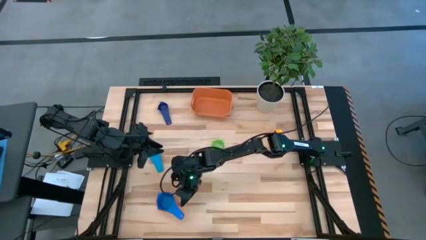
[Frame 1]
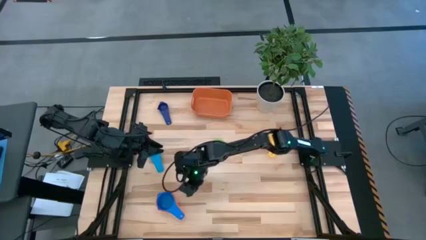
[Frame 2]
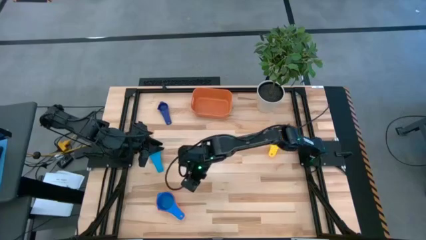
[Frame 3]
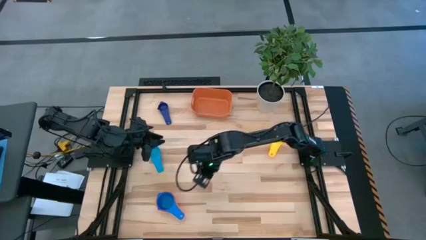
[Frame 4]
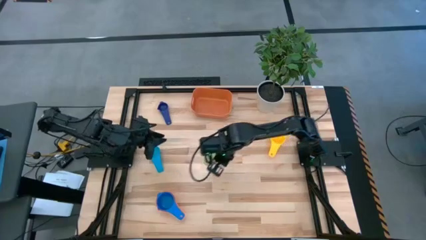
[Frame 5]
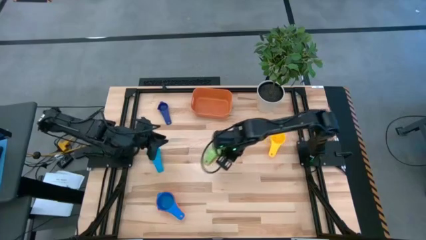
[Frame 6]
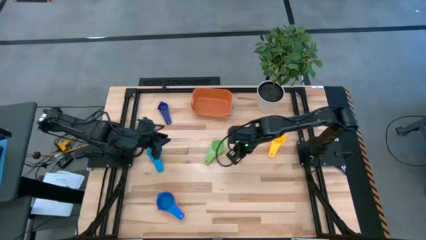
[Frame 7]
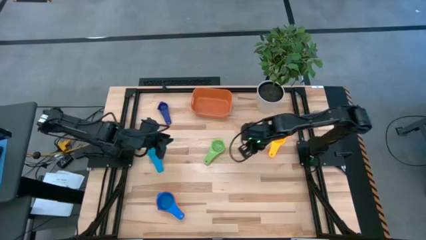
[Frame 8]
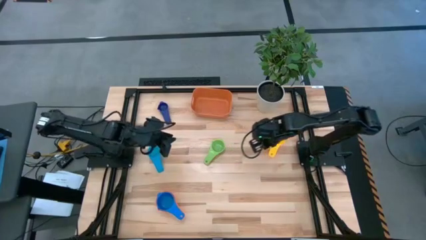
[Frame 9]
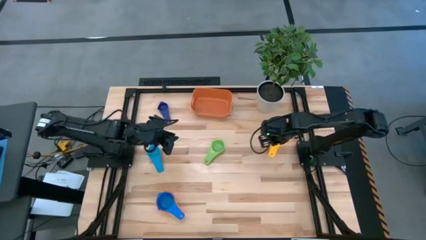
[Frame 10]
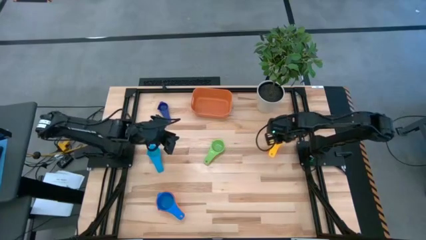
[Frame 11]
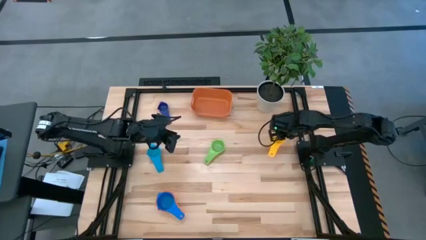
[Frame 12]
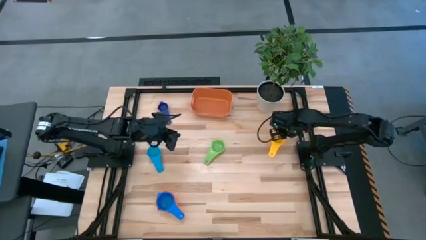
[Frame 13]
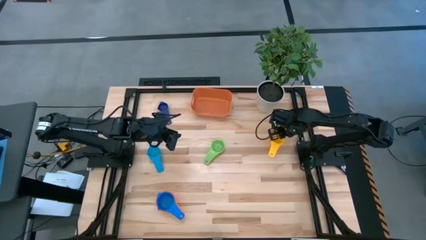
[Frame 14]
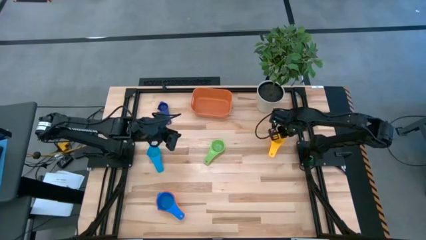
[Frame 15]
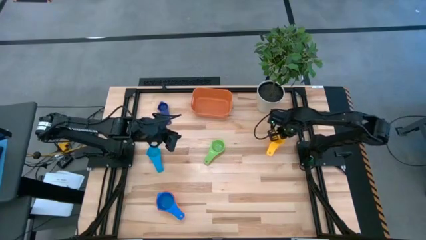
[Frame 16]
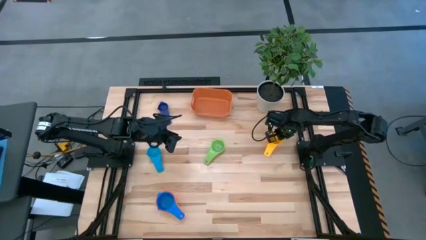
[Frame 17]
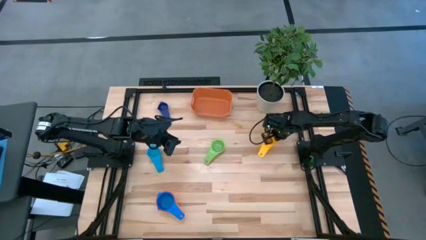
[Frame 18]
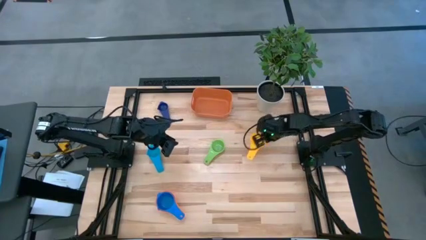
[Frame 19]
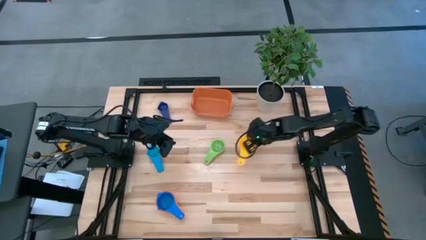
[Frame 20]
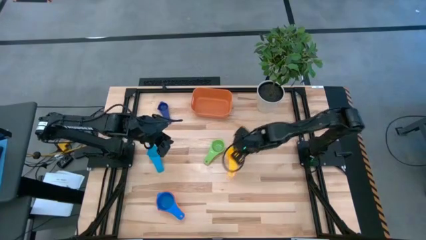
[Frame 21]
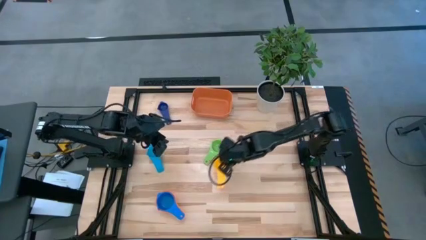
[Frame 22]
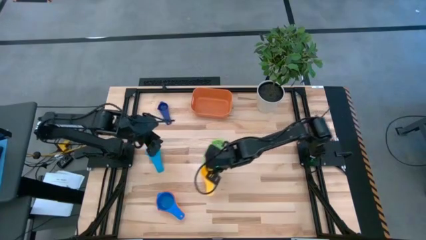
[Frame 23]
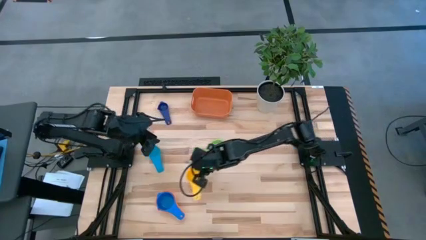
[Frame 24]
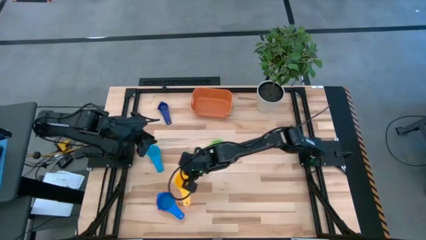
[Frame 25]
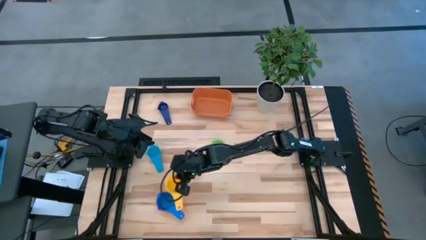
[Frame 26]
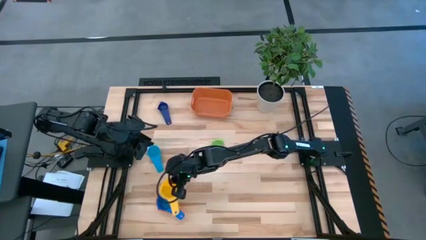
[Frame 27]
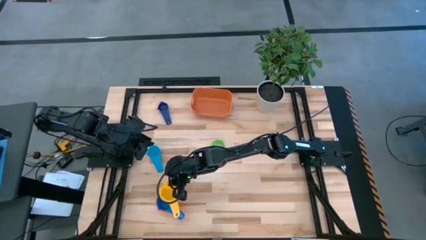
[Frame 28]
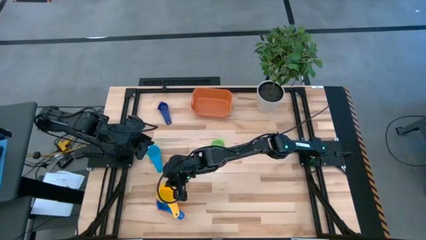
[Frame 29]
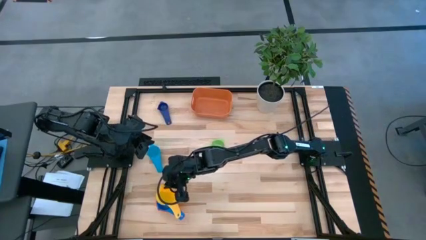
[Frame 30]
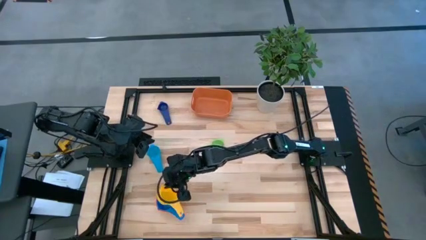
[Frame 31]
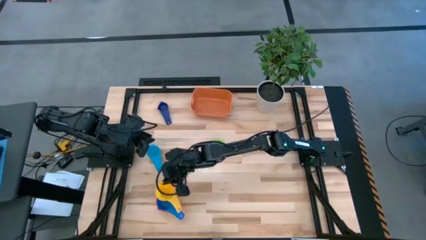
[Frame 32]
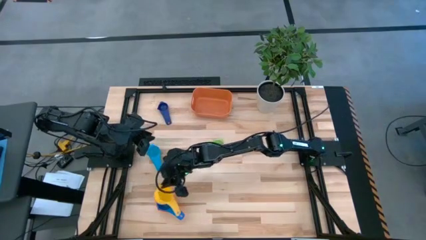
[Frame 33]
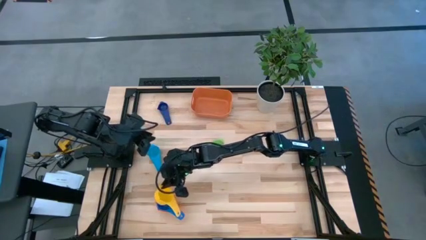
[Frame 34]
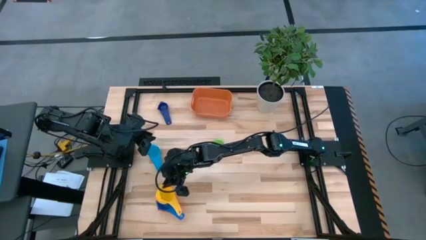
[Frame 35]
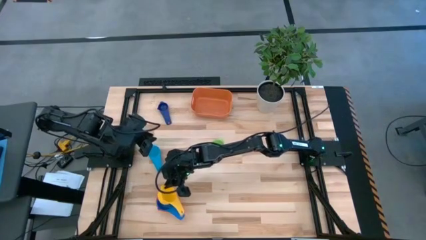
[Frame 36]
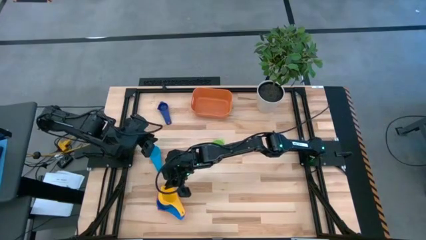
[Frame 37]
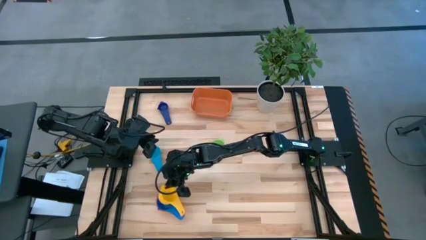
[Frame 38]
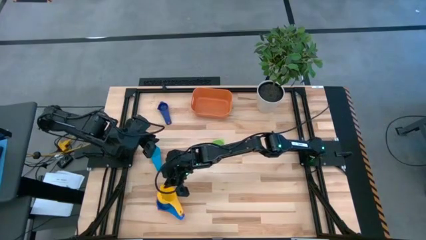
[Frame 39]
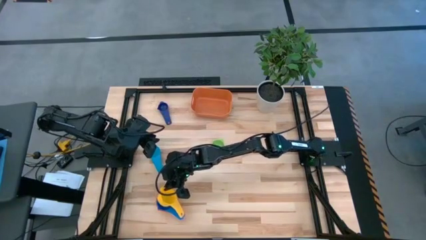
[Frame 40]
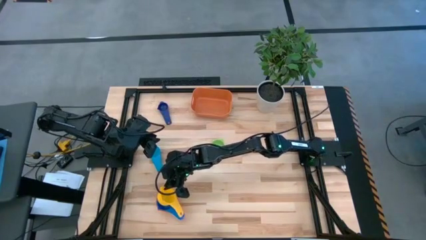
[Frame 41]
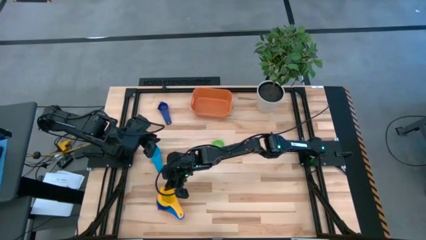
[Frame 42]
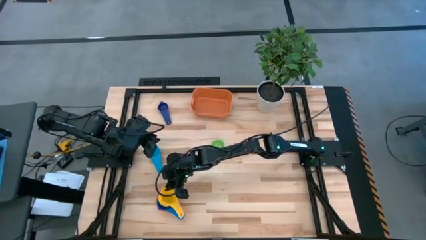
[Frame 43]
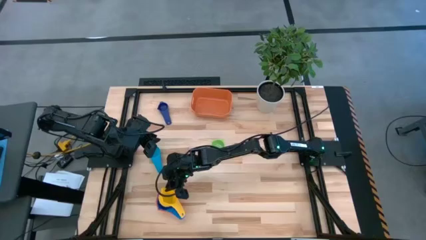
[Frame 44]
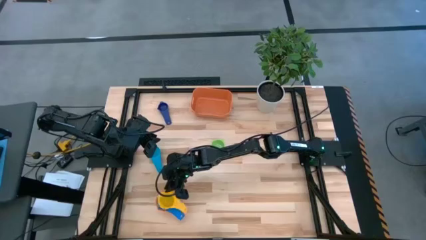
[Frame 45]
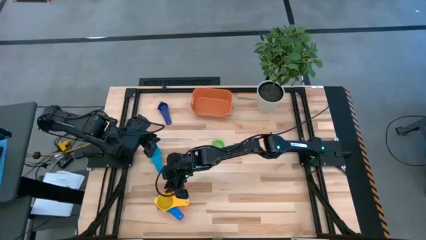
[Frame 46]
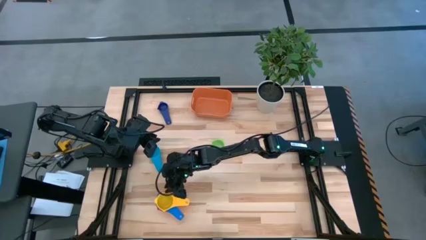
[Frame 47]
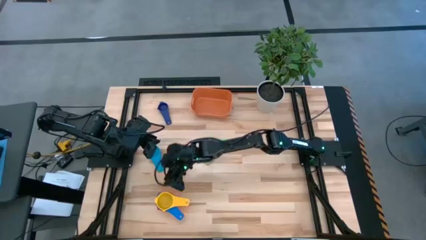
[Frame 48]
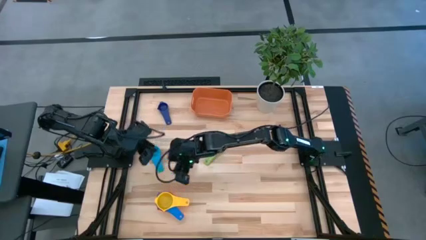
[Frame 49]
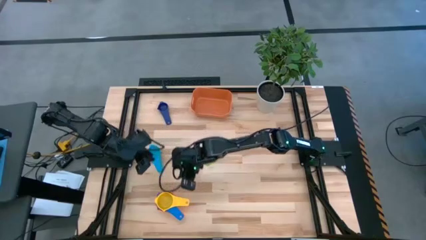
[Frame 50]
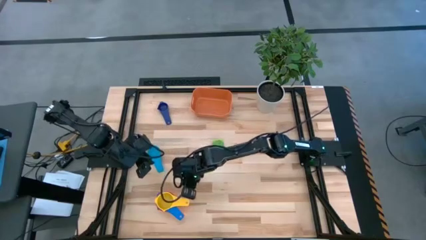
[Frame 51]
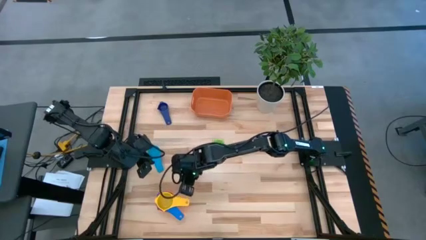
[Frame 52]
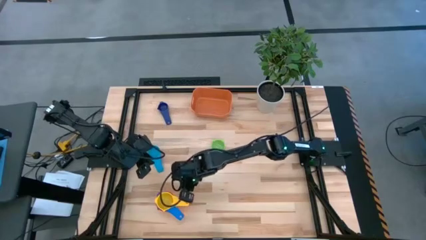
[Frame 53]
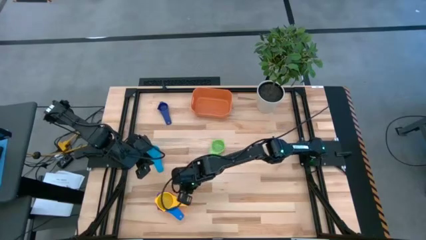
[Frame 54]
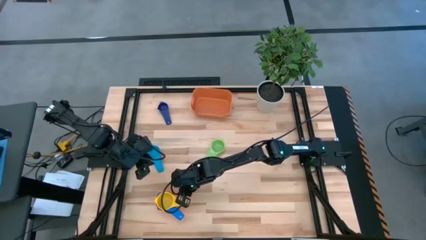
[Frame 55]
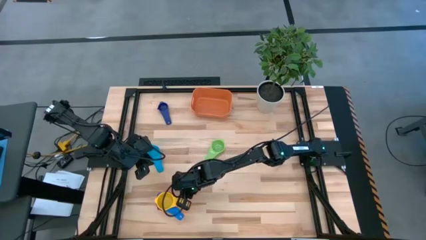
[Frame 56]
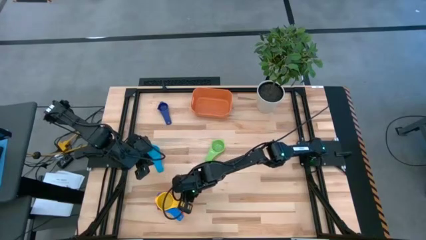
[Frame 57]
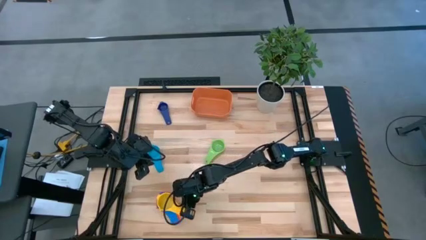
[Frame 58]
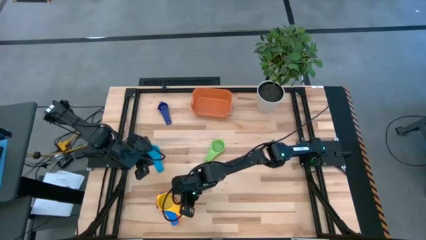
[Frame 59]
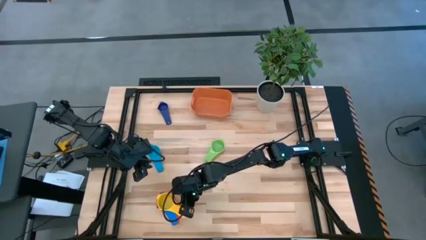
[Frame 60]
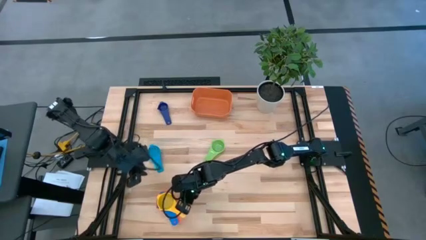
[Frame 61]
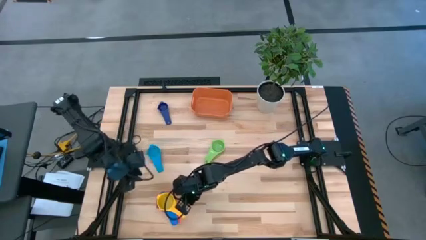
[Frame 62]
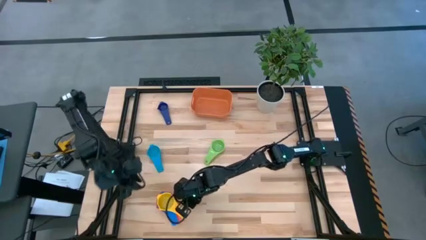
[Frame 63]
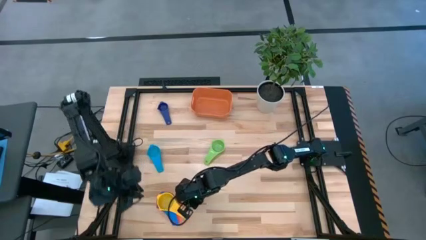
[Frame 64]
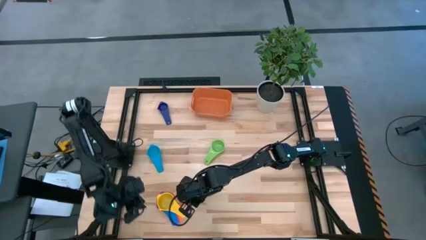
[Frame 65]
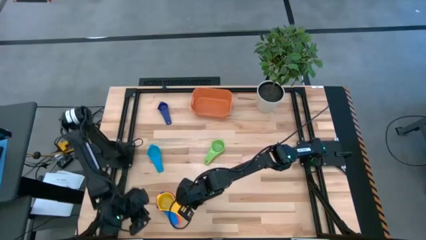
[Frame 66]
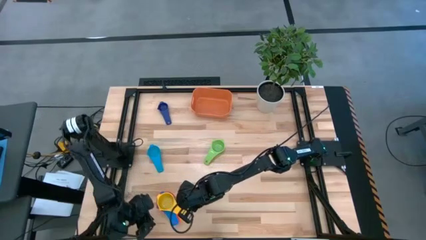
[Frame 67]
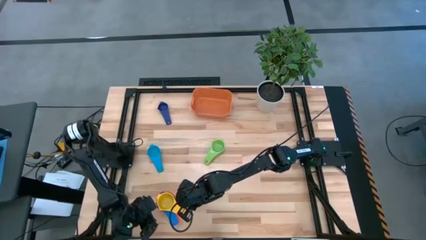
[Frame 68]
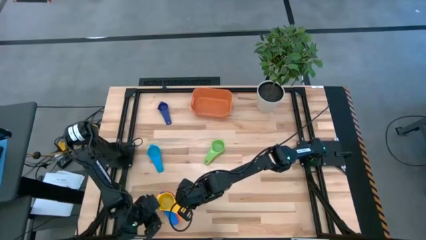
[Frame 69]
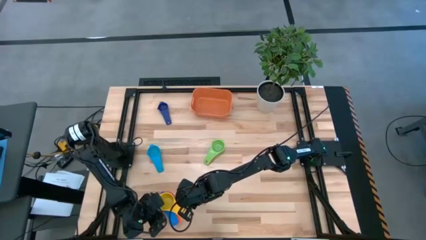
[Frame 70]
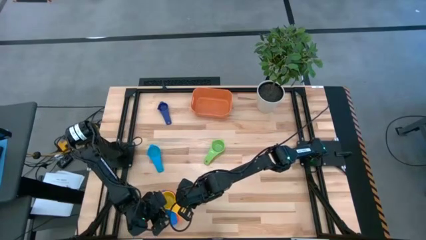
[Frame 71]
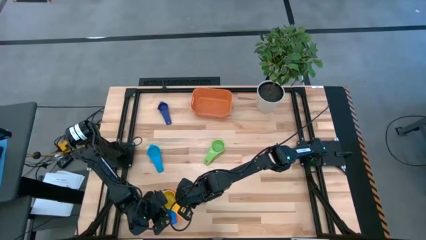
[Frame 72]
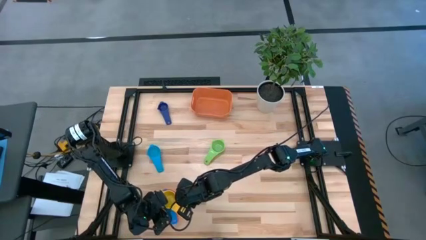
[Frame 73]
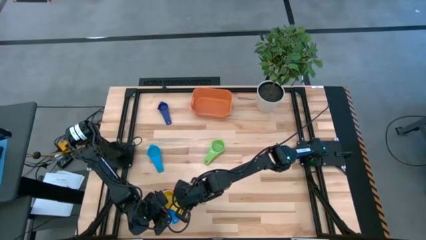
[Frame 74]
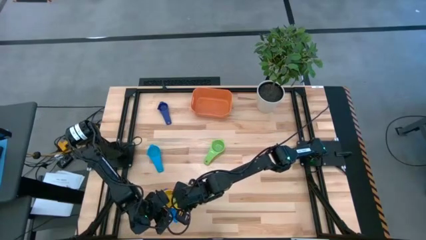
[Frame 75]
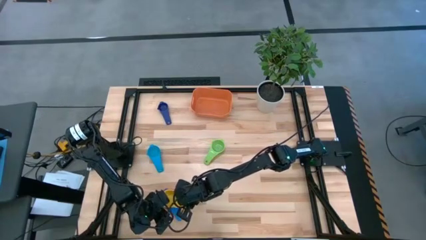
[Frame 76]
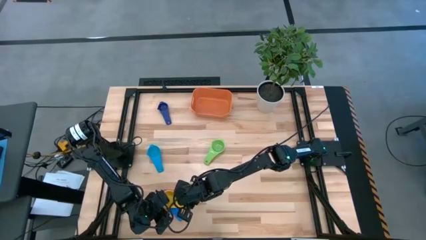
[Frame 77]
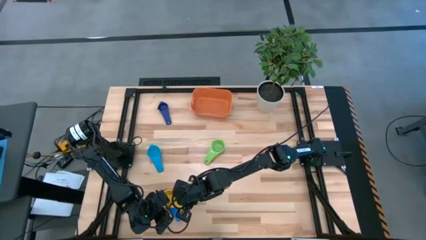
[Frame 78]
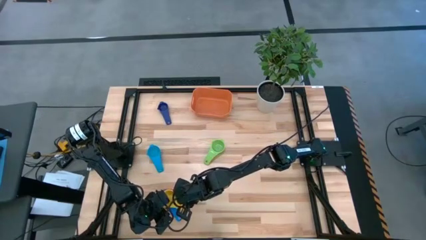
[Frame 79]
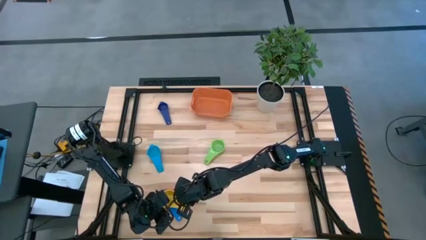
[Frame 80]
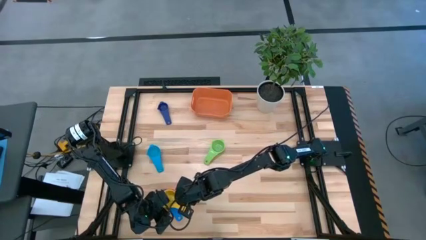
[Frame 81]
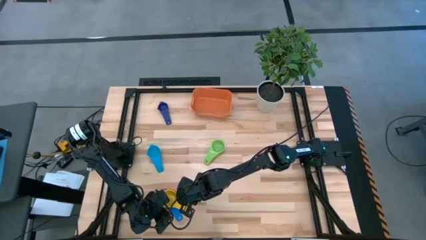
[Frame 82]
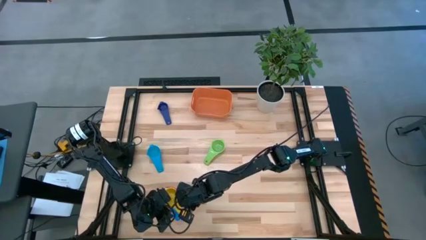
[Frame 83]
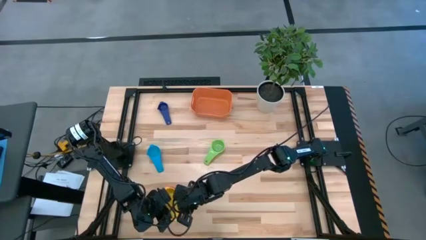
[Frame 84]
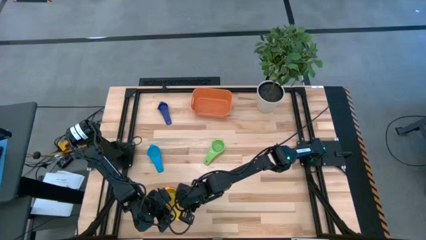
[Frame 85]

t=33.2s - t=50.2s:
Task: Nest measuring cups in basket
Stack the yellow measuring cup on top of the blue measuring cup
